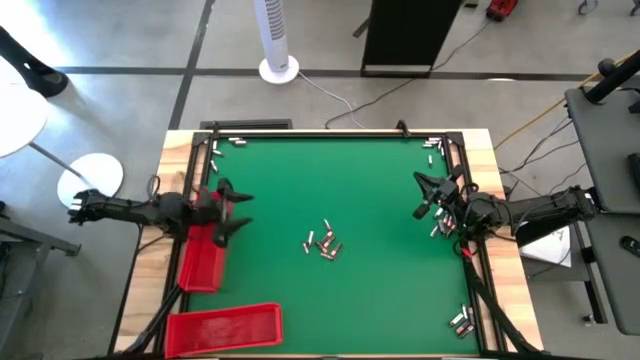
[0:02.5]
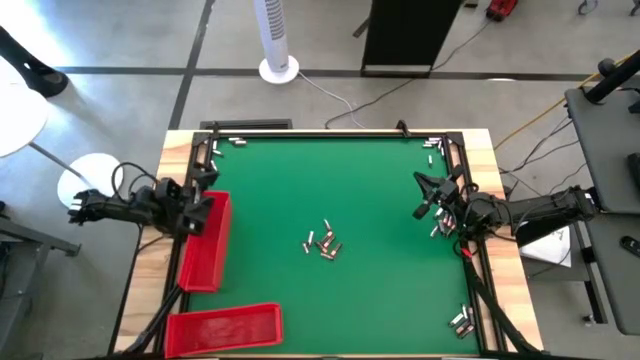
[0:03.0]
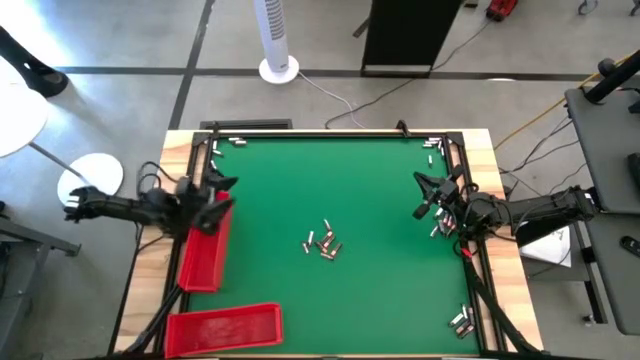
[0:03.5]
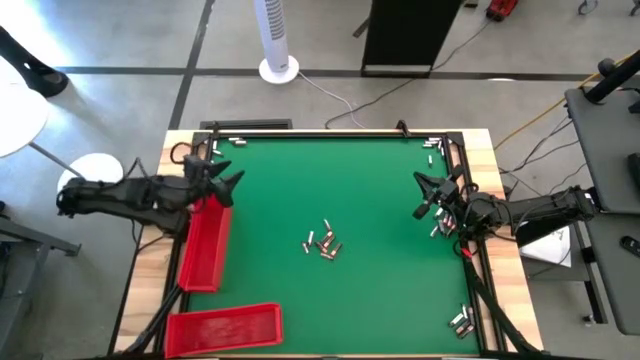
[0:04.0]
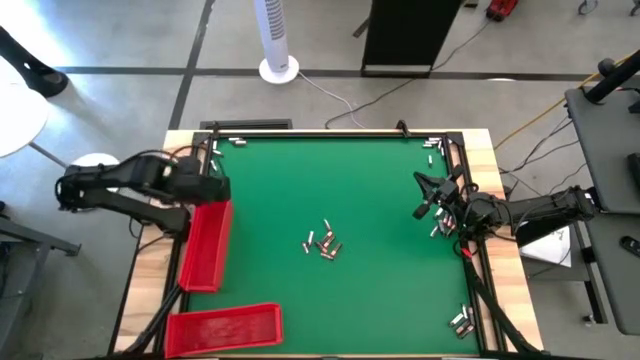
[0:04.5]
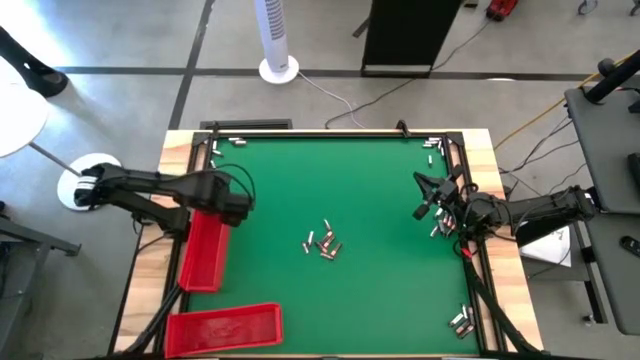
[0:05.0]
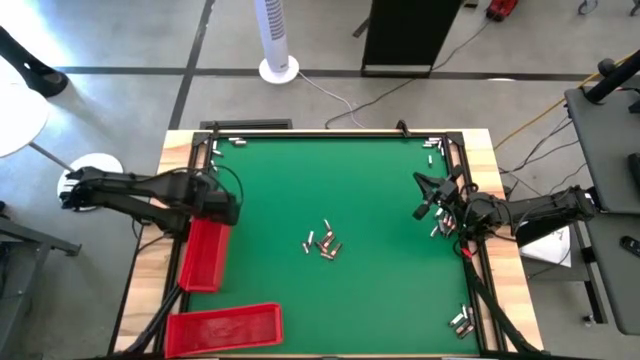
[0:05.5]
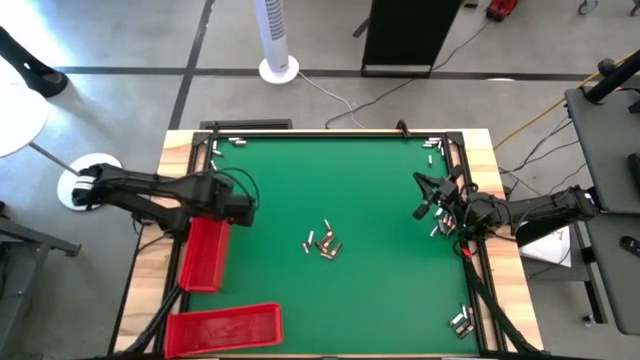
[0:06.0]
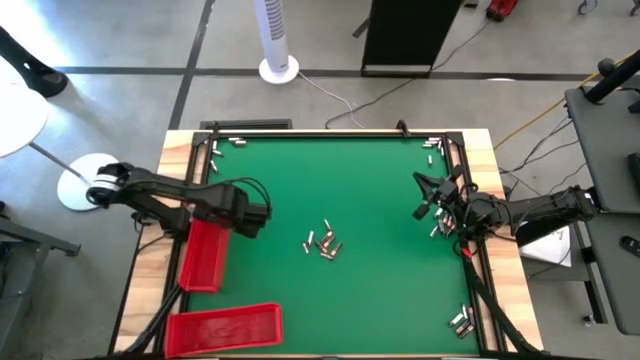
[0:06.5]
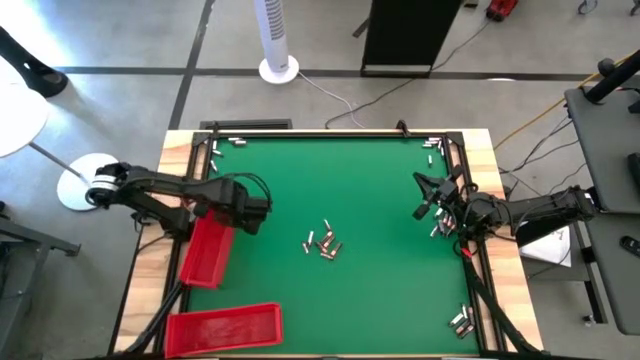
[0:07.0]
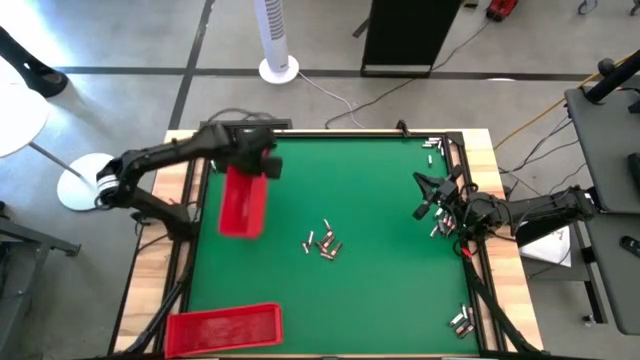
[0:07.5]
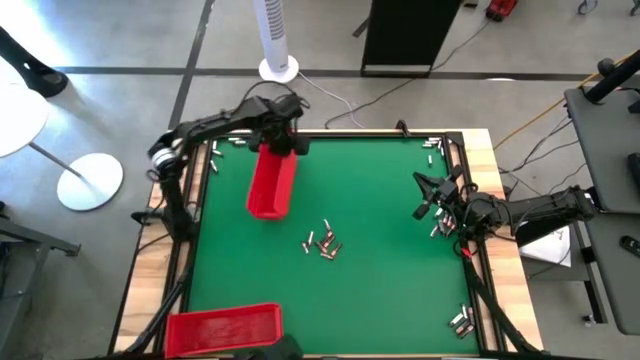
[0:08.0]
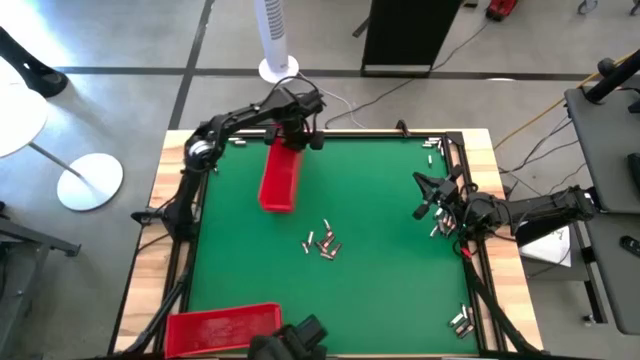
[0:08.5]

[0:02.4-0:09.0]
Task: Sort batteries
Move the top red bin to the top left of the table

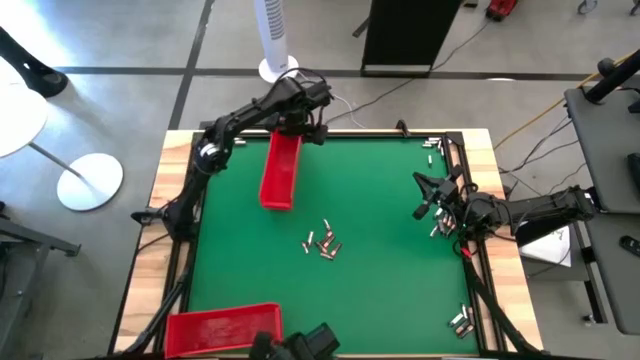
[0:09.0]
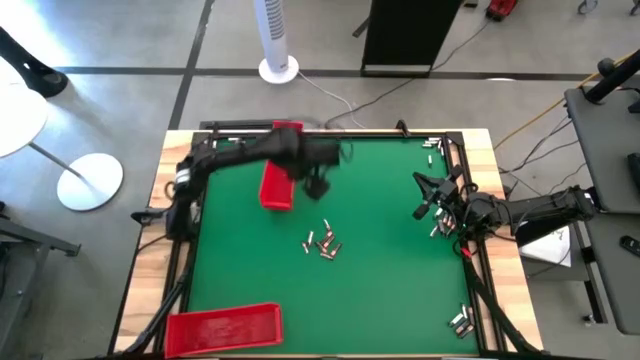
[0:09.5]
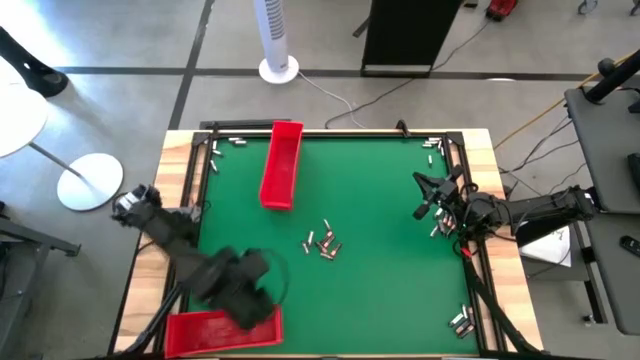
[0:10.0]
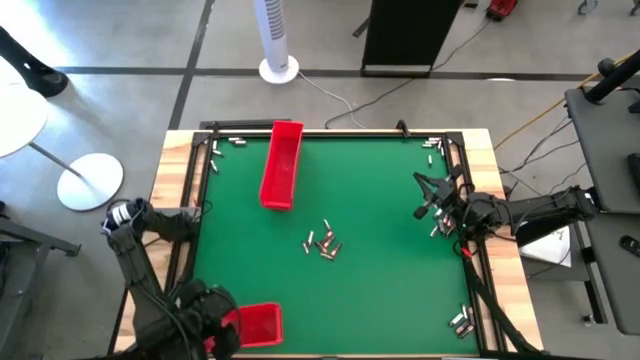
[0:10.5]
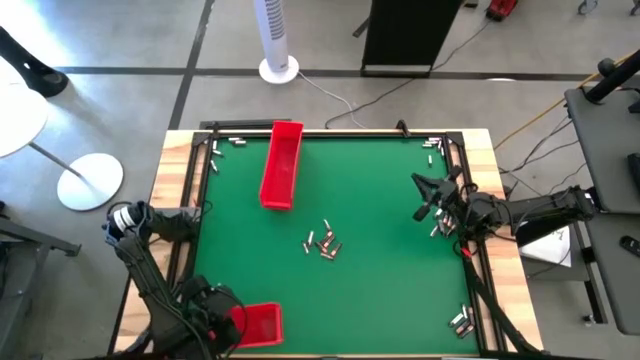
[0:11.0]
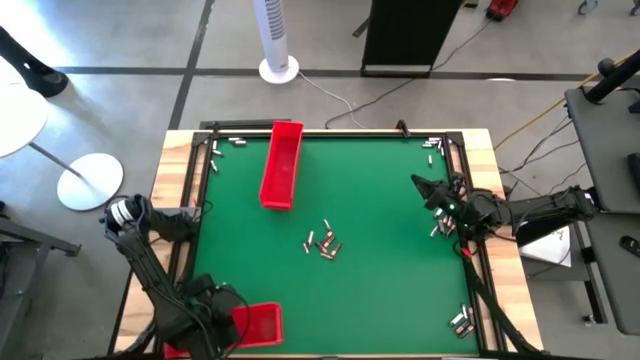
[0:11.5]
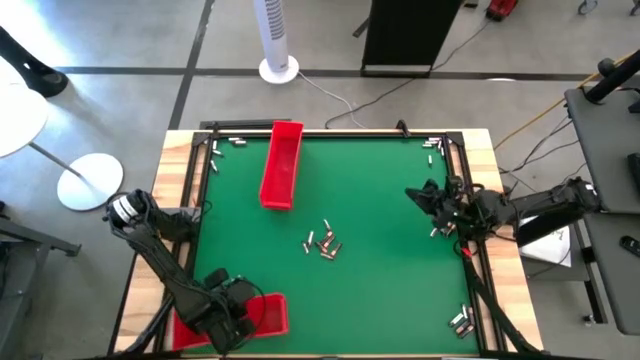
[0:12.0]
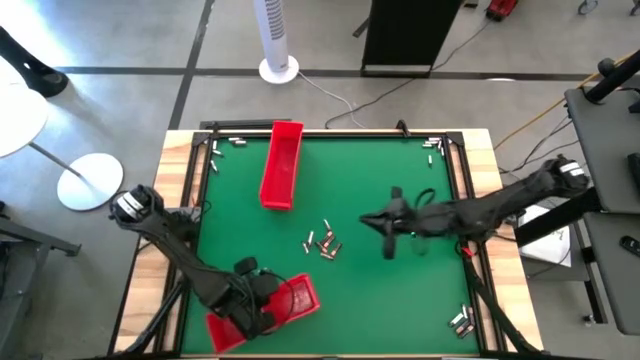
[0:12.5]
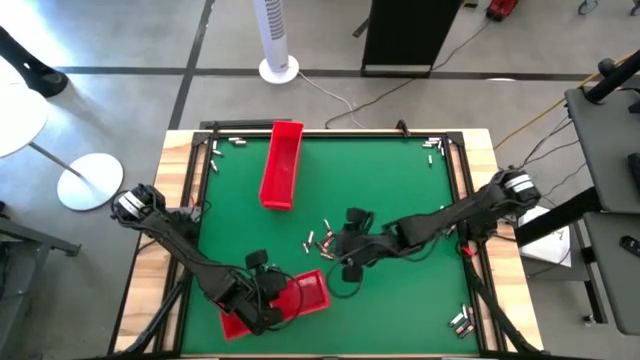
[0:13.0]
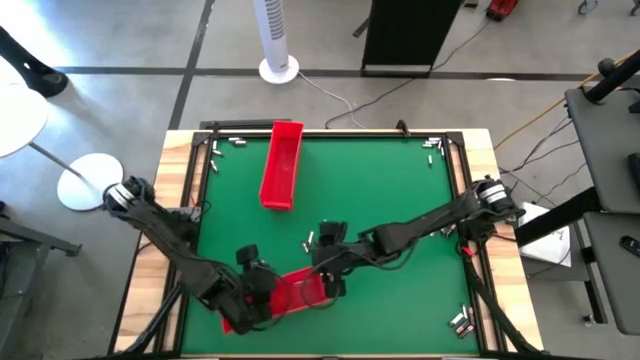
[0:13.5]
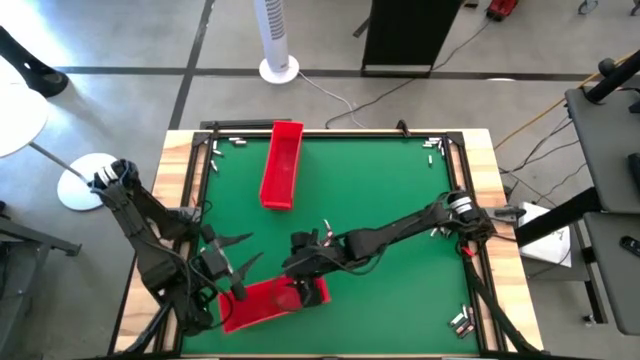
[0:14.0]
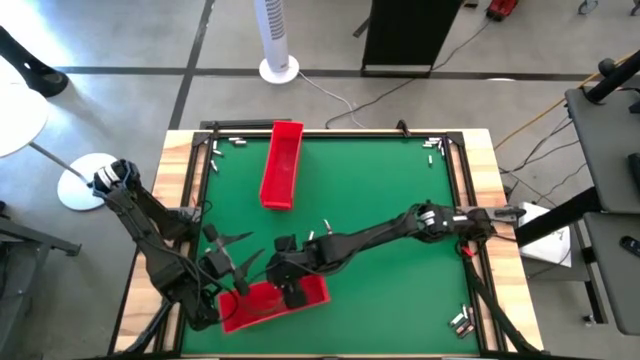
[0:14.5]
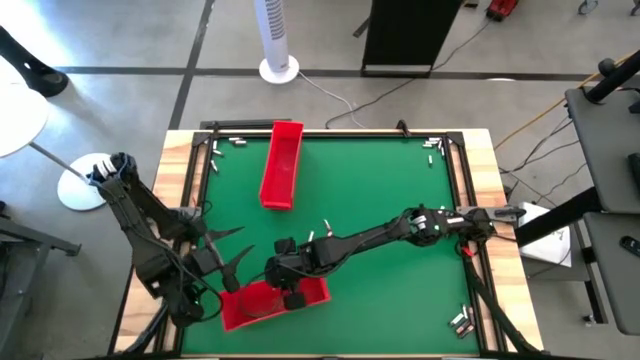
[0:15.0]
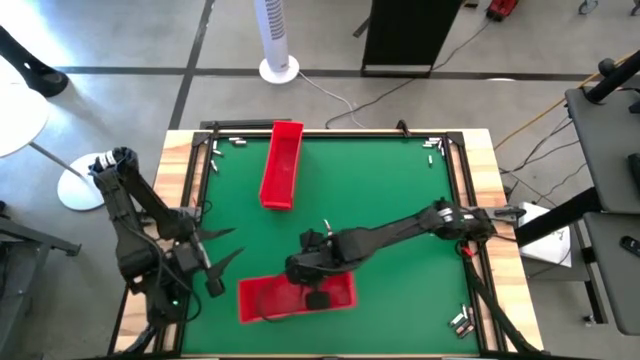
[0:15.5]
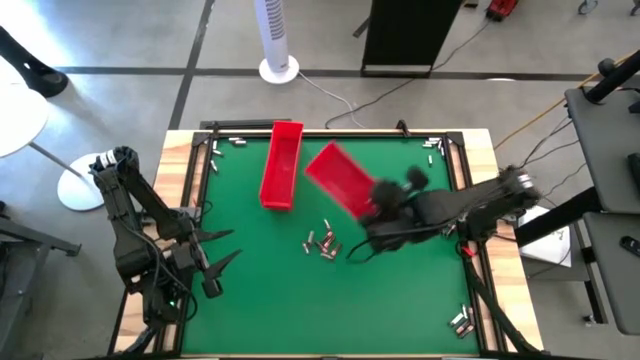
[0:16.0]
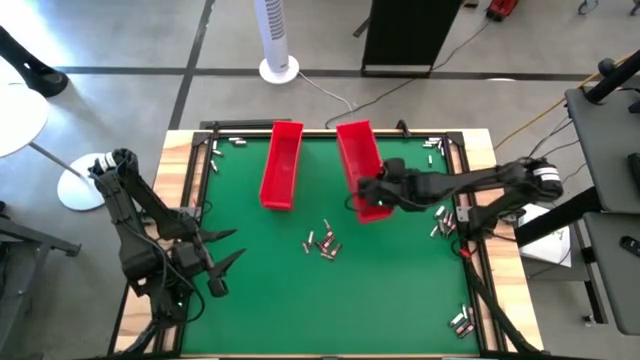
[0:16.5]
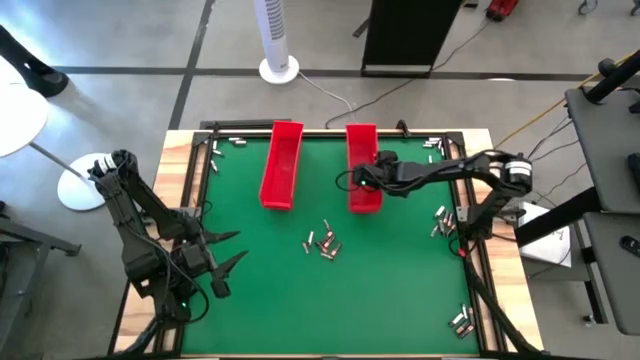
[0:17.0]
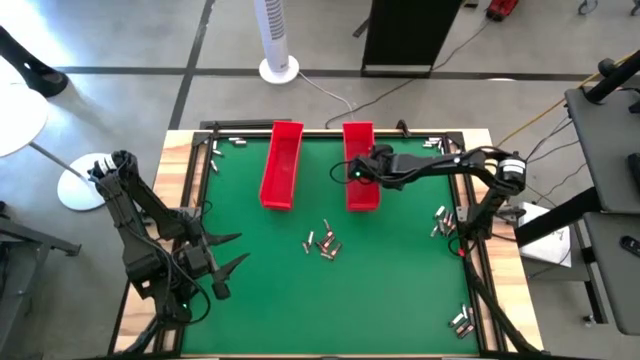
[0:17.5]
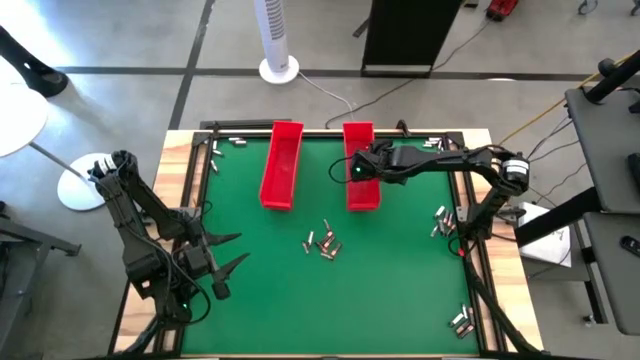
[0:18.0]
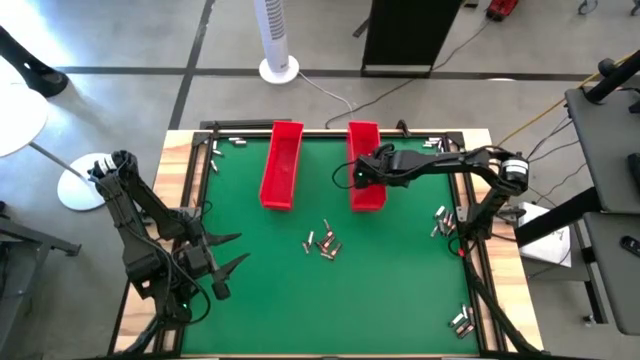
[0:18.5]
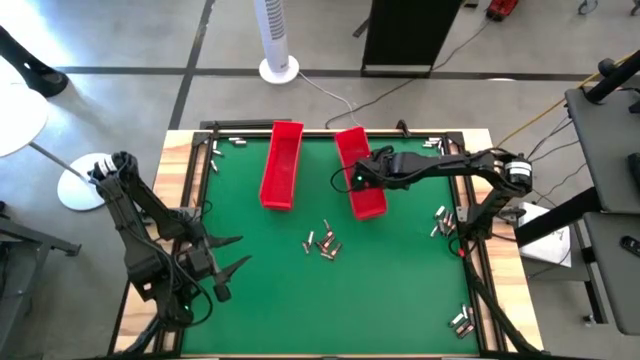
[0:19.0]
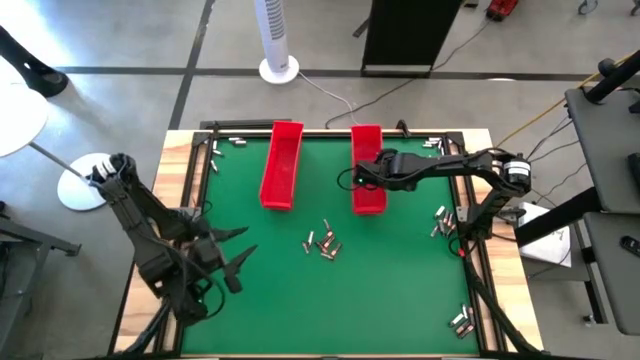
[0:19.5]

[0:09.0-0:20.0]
Move the bottom red bin to the top right of the table

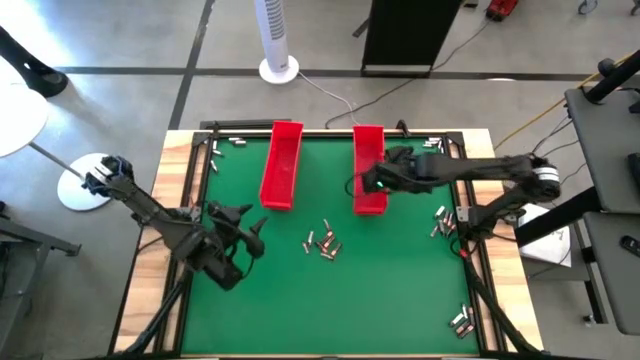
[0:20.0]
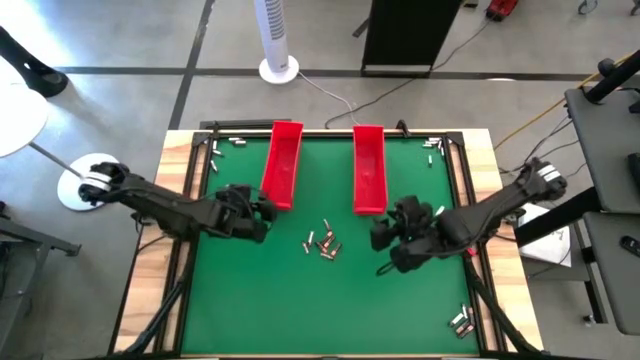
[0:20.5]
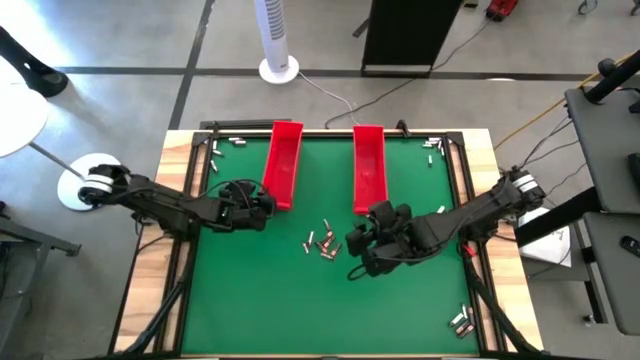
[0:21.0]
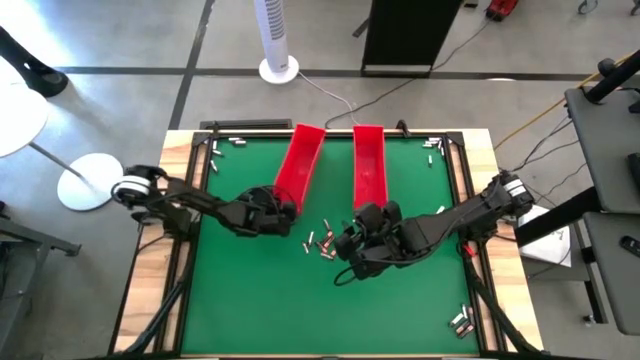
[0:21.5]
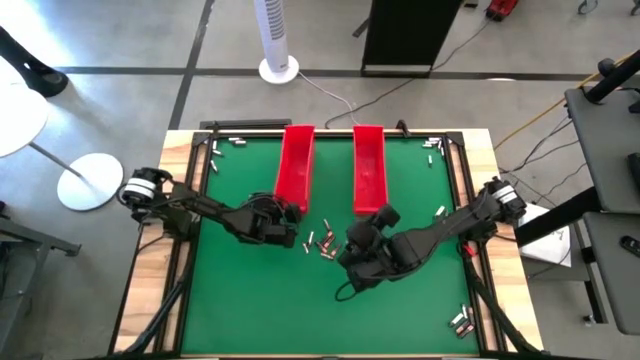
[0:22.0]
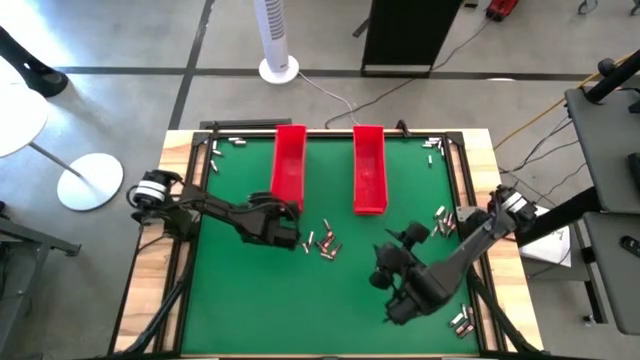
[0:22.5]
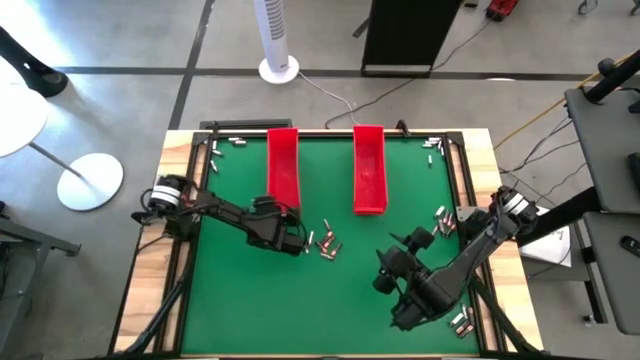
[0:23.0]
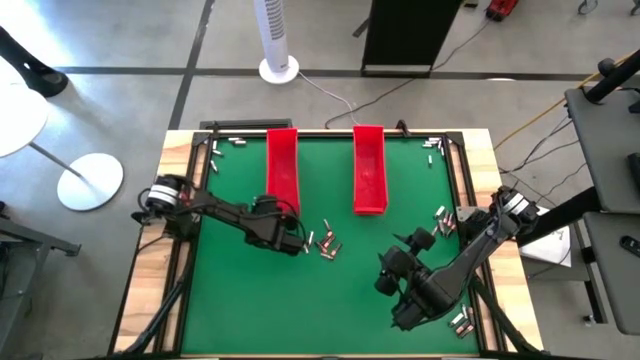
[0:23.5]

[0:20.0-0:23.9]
Adjust the left red bin
